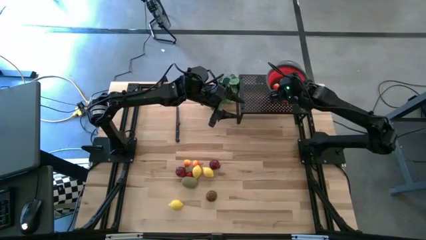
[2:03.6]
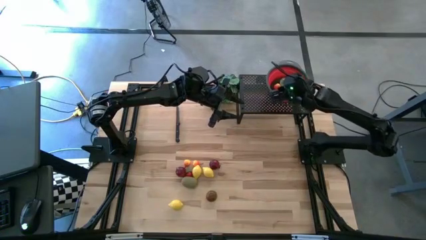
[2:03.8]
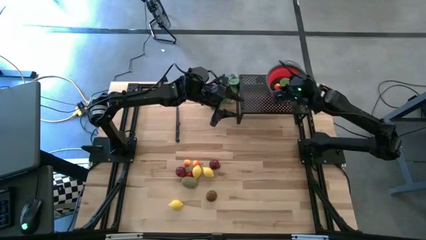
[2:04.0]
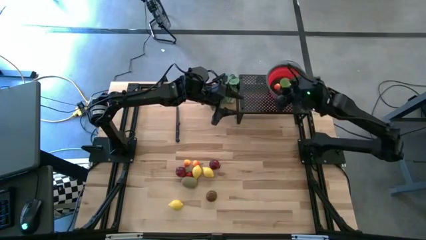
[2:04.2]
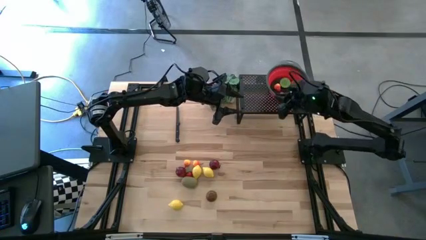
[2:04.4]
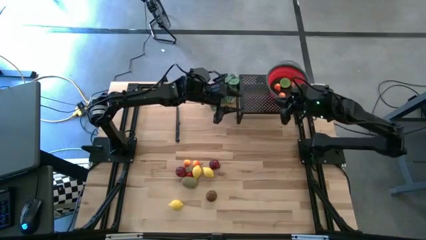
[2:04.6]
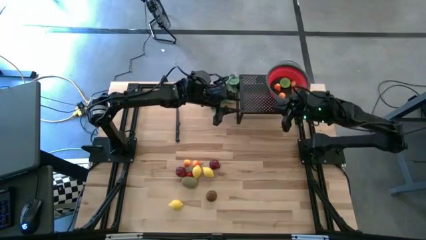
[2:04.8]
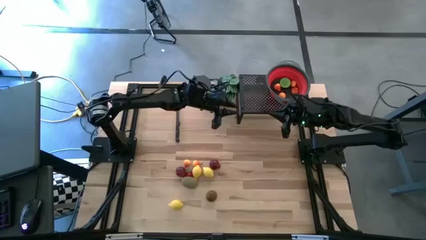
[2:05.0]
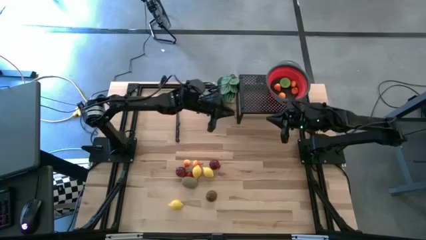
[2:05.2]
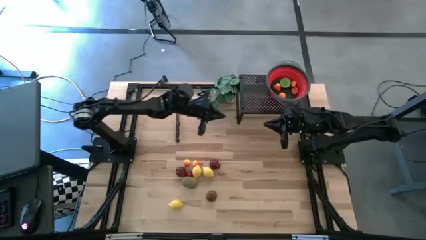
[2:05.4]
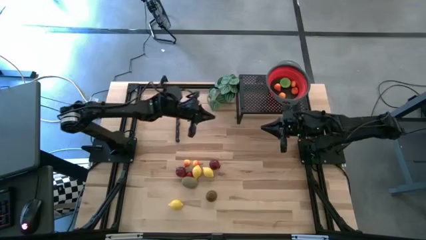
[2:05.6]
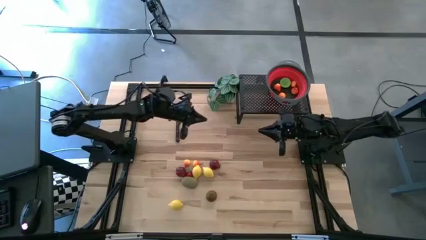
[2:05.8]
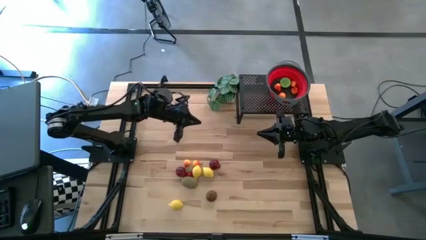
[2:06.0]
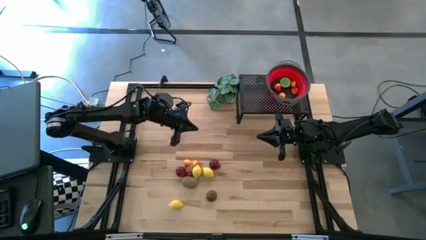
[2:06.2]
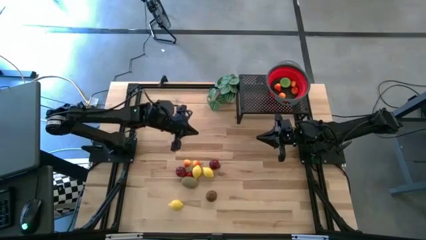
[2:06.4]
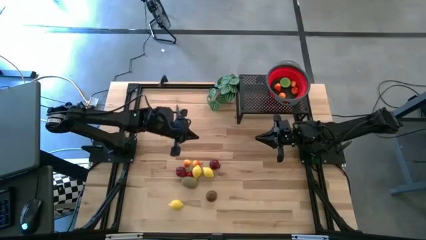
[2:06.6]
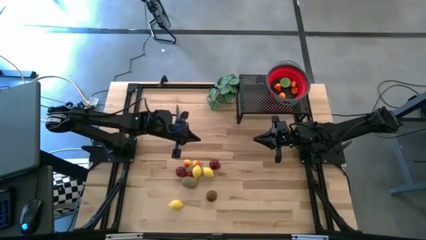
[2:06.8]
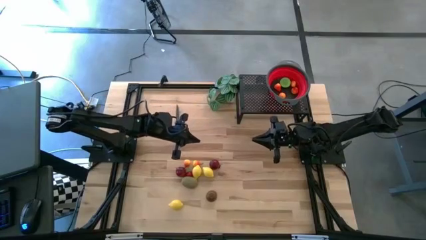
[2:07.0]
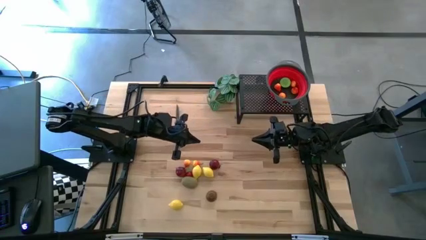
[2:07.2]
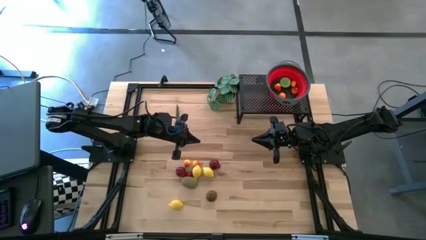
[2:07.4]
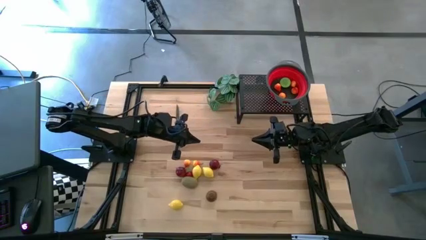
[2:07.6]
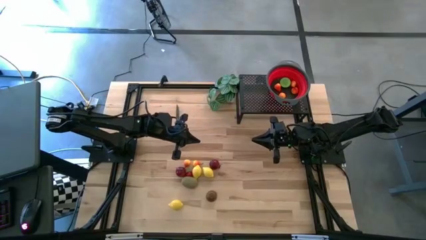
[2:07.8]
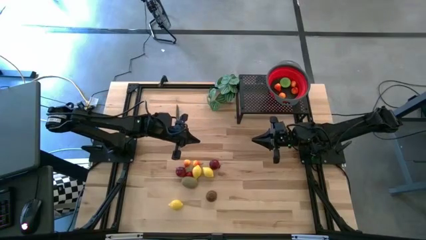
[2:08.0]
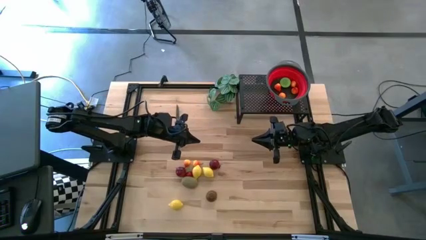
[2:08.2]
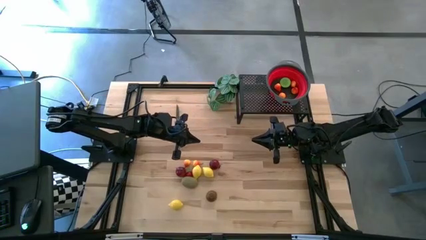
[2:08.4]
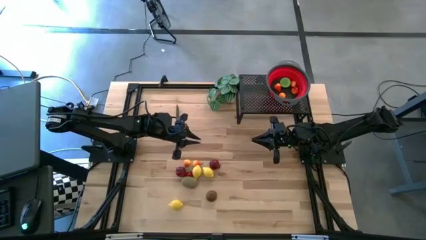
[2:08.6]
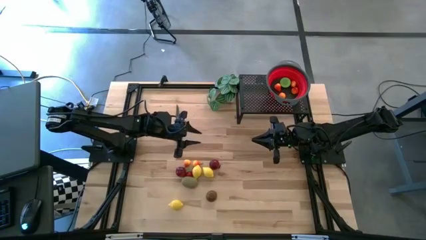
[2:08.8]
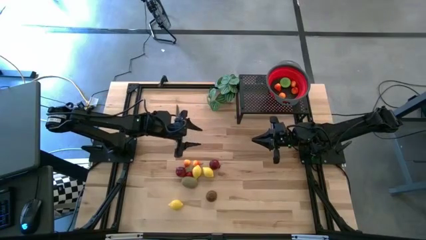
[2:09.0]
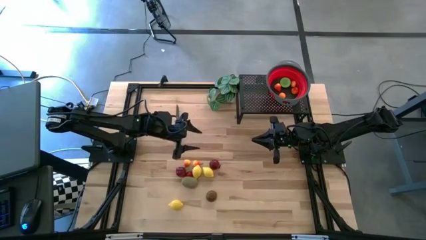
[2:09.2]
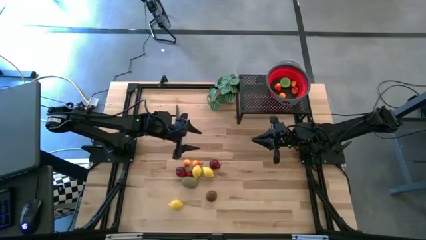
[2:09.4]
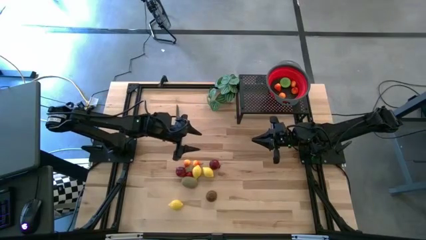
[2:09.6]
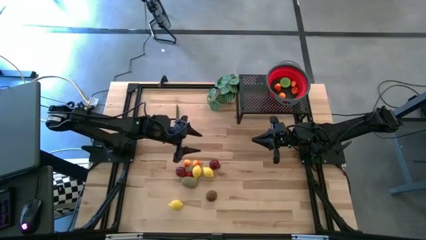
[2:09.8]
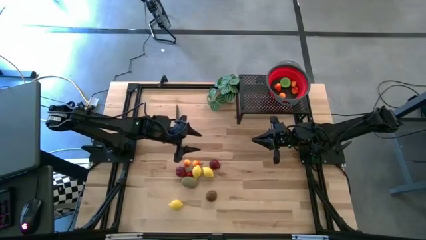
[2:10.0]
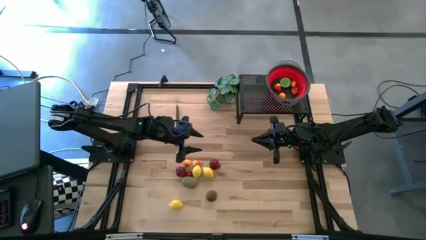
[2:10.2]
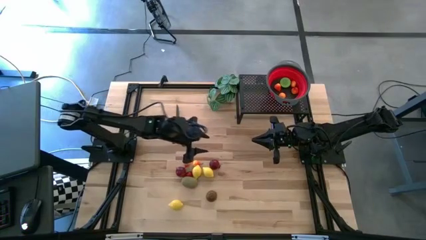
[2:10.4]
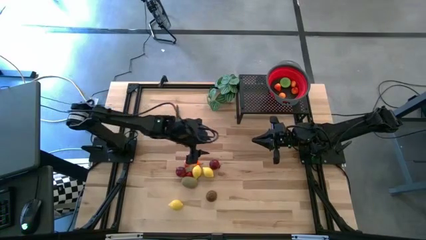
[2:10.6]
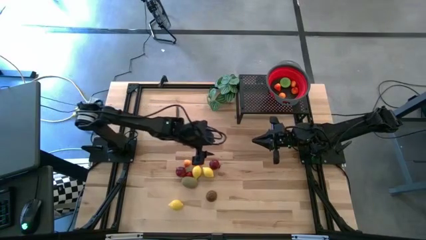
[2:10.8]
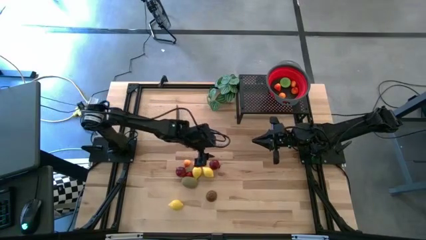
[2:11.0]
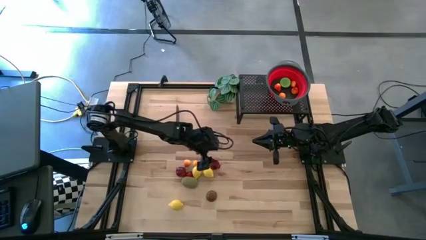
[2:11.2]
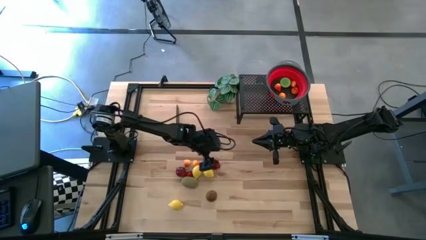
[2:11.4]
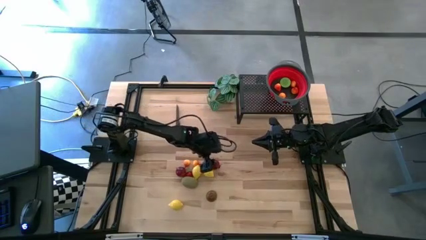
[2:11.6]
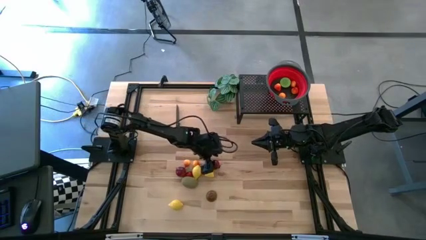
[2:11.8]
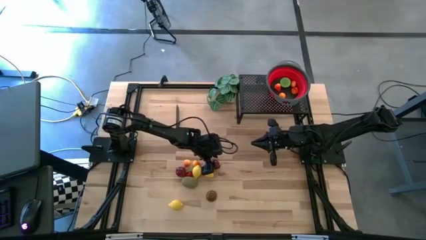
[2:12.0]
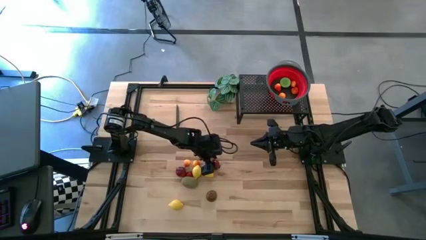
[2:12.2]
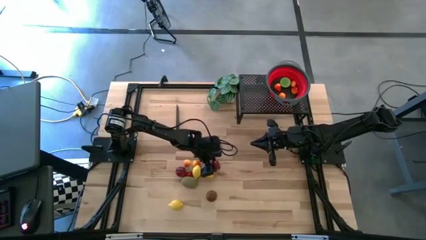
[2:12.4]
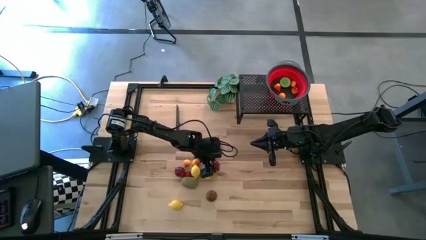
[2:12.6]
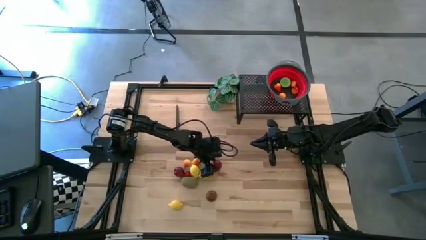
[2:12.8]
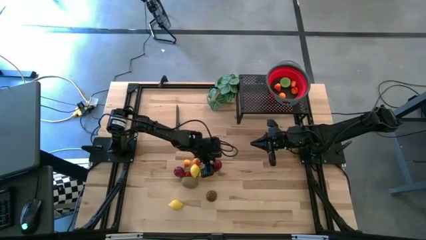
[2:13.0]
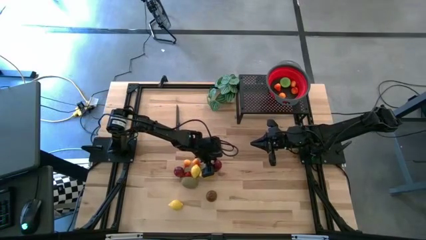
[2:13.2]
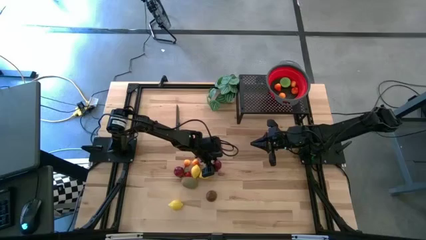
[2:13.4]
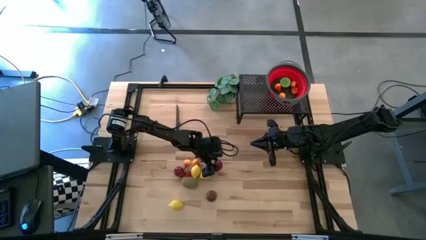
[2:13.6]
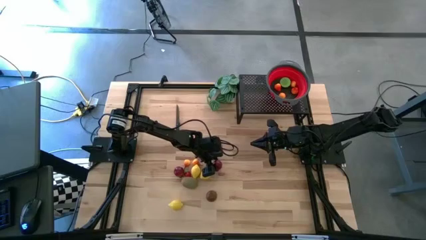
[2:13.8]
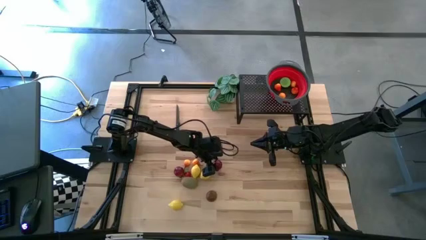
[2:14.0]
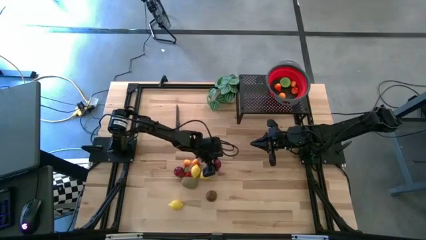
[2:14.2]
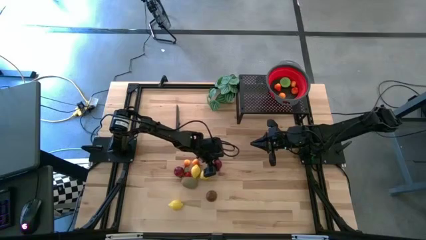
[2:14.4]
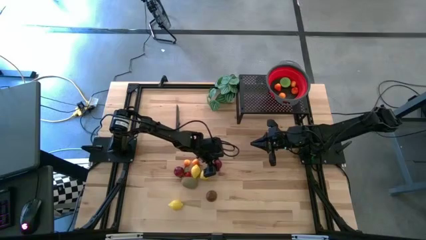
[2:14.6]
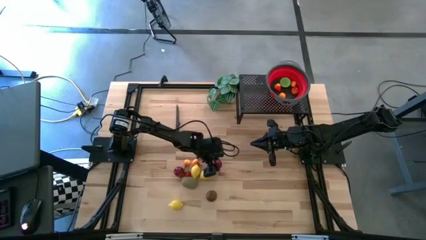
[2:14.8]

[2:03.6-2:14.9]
Task: Pick & Place Fruit
Put the red pomegranate into the red strainer bowl

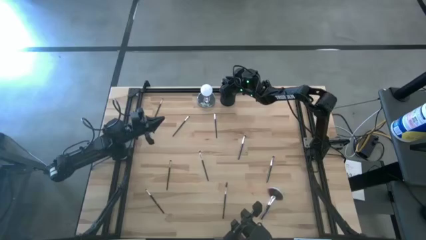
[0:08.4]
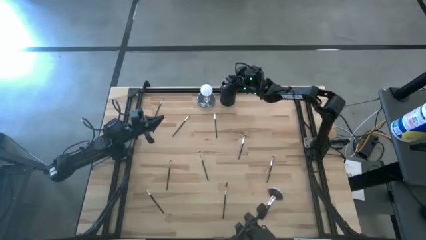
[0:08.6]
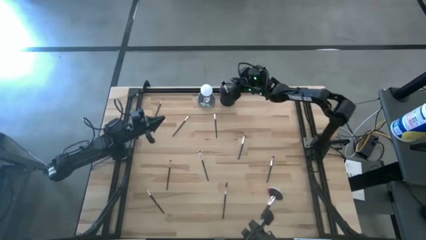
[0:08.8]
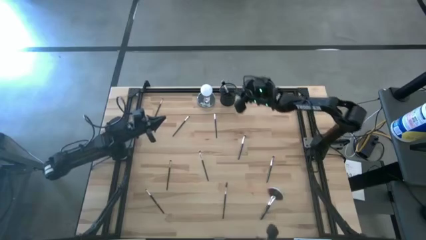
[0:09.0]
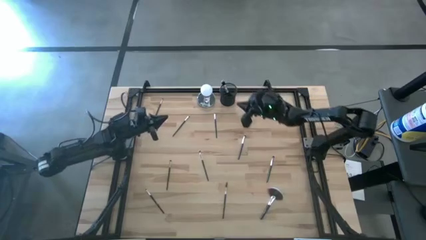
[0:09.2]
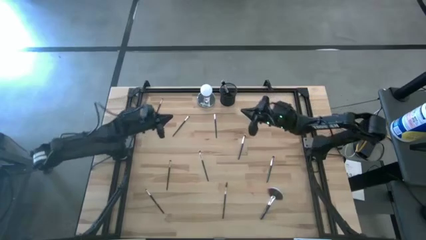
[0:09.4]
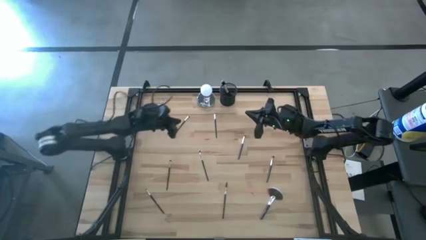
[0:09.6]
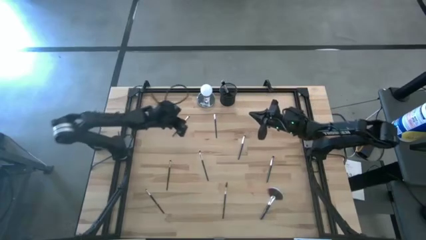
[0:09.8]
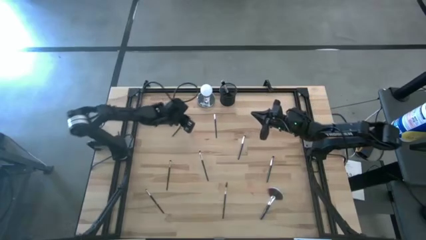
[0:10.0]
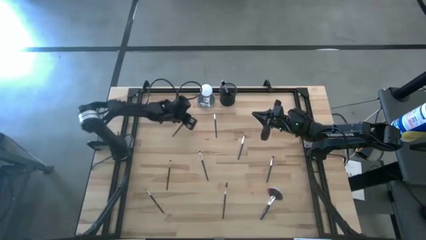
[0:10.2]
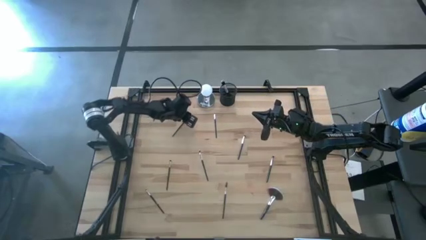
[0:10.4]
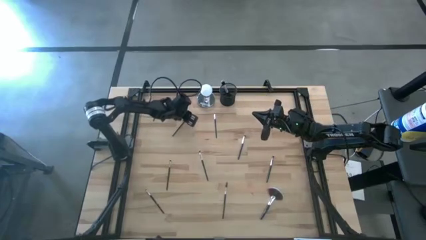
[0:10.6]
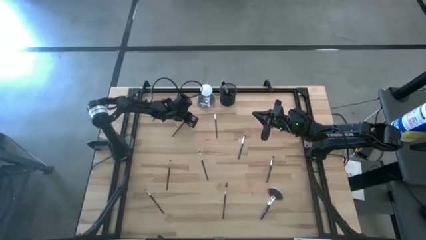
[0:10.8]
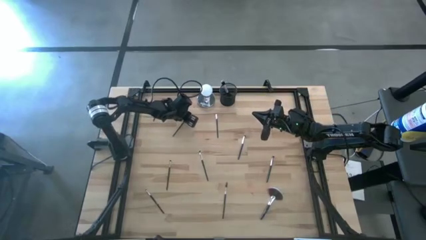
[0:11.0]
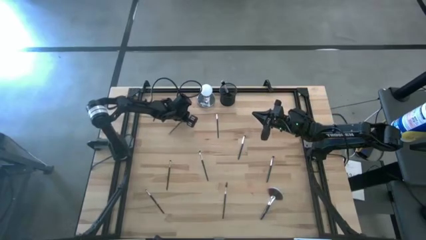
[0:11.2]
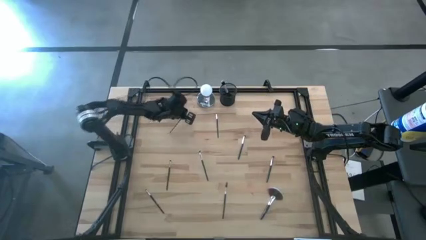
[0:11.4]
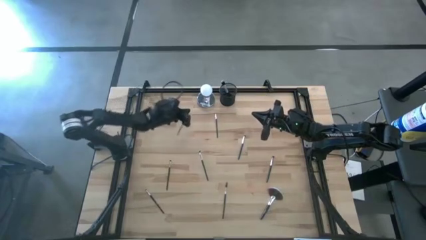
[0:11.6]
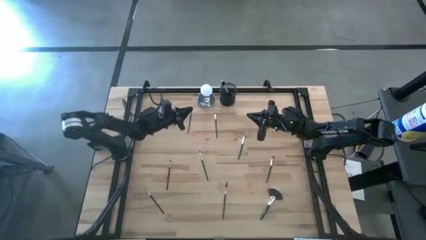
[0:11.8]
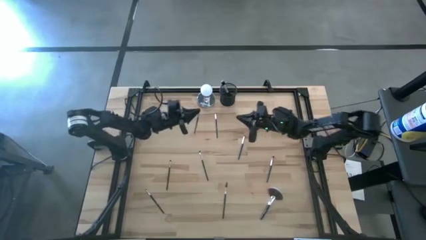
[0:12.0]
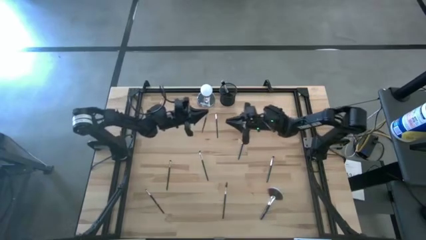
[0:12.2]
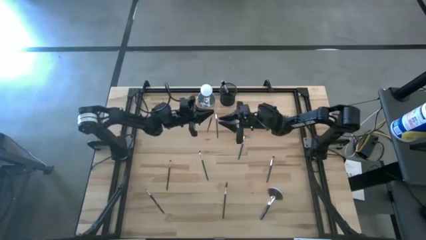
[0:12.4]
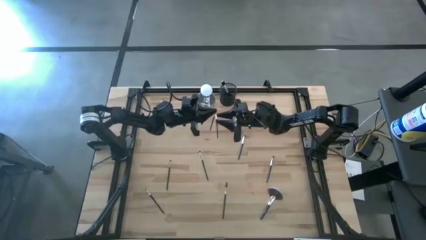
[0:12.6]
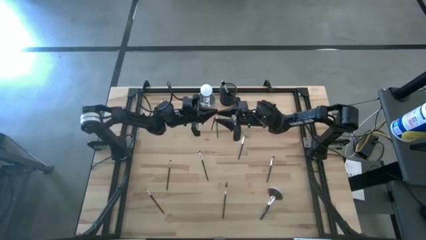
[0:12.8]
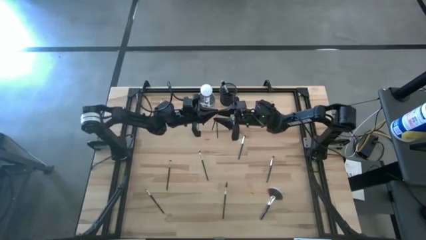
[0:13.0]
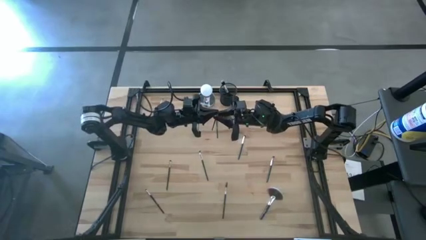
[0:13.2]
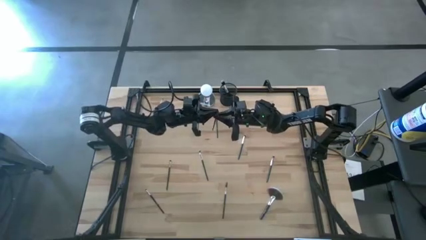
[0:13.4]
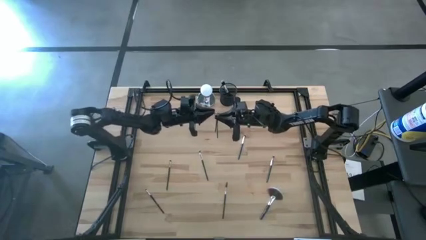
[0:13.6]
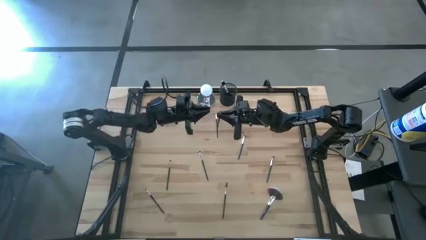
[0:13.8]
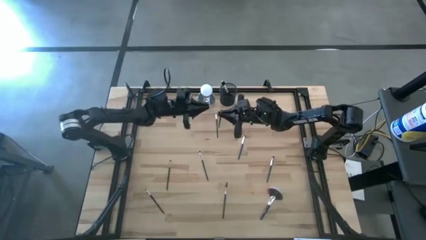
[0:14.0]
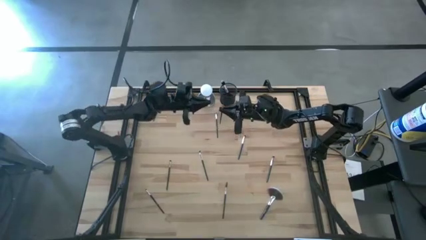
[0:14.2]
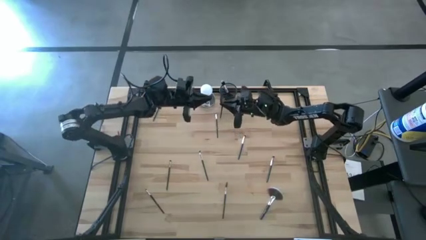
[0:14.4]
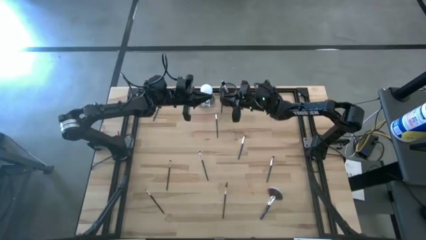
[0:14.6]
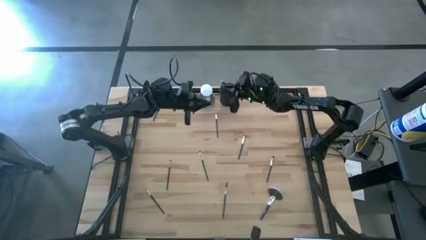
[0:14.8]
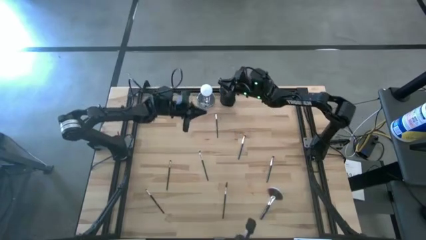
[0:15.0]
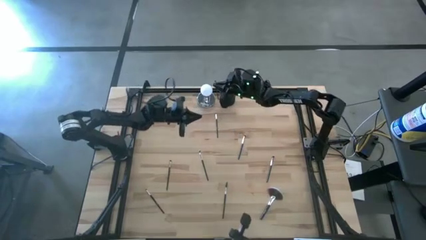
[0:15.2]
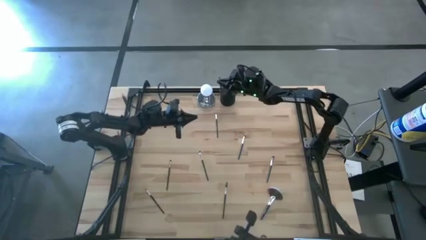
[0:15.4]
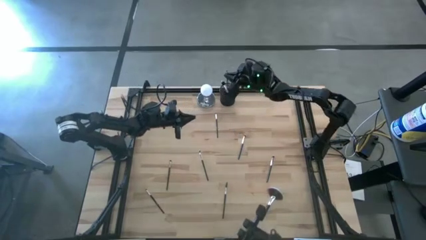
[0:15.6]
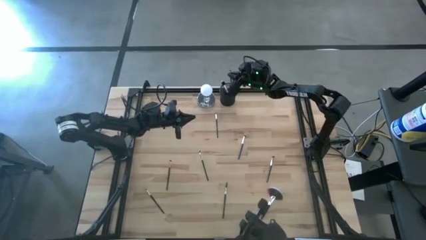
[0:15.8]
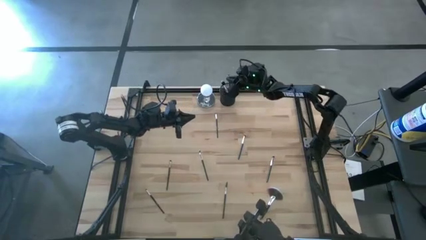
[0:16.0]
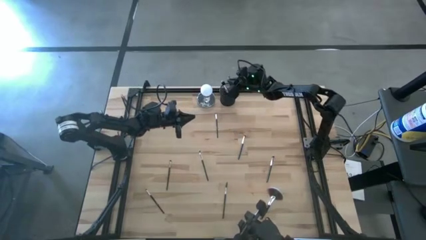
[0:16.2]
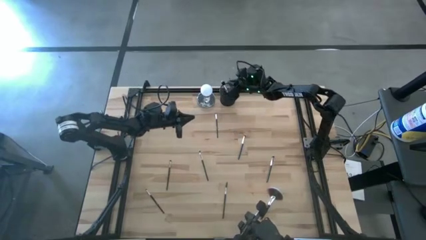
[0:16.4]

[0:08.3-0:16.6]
Task: Pick & Place Makeup Supplies
Put the makeup brush into the black makeup holder
